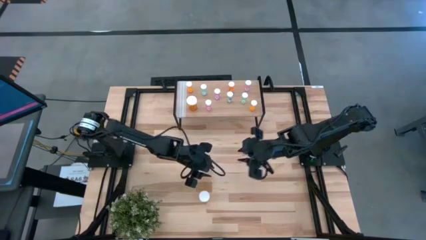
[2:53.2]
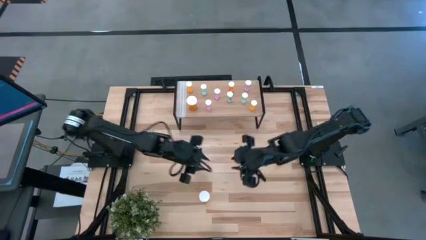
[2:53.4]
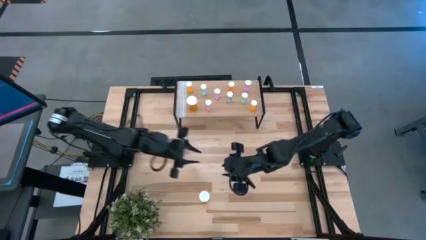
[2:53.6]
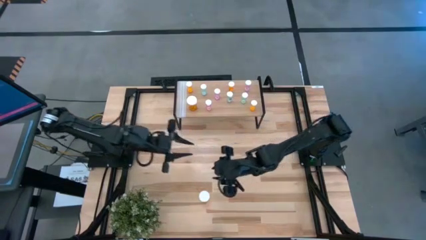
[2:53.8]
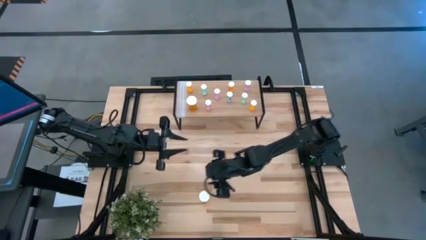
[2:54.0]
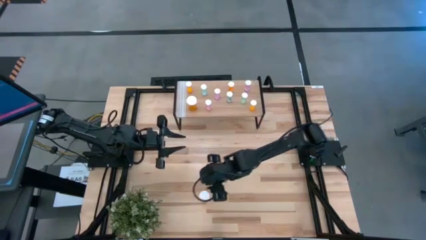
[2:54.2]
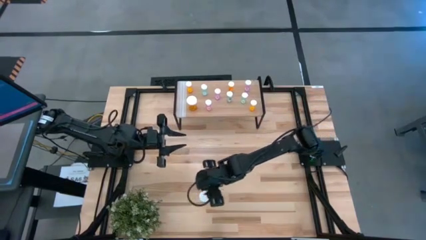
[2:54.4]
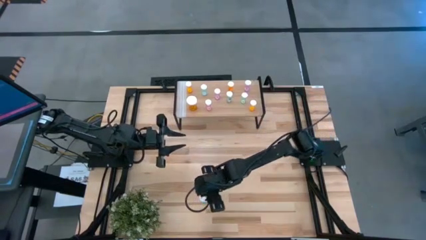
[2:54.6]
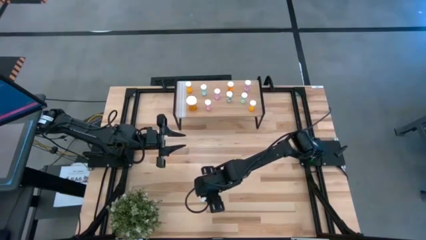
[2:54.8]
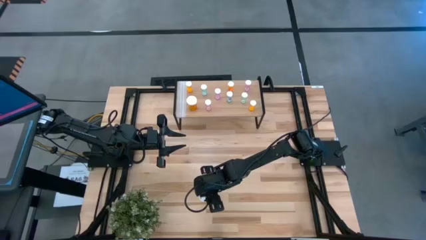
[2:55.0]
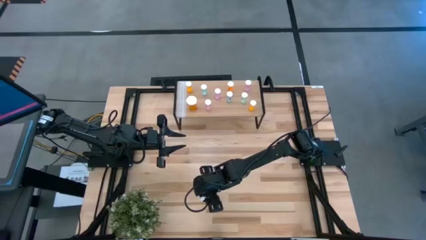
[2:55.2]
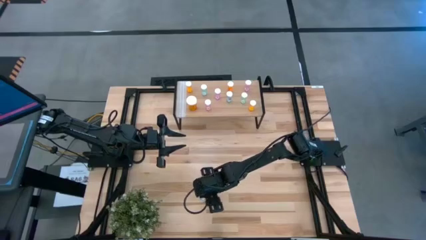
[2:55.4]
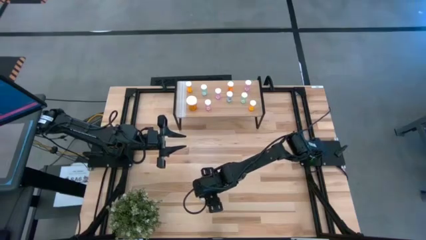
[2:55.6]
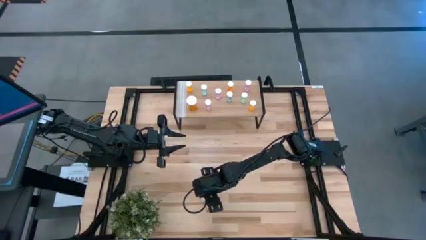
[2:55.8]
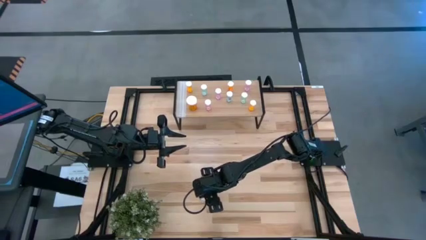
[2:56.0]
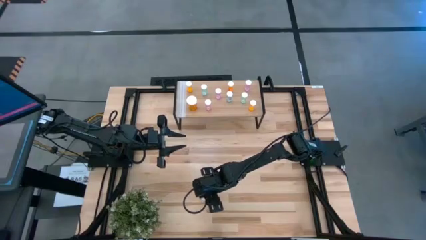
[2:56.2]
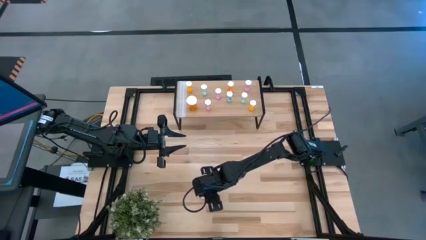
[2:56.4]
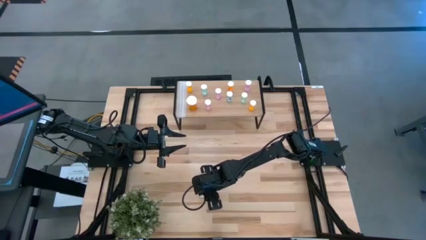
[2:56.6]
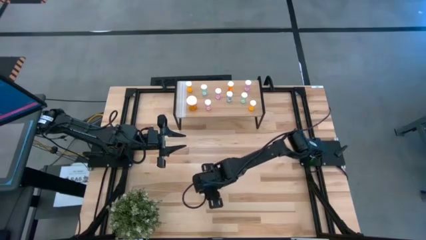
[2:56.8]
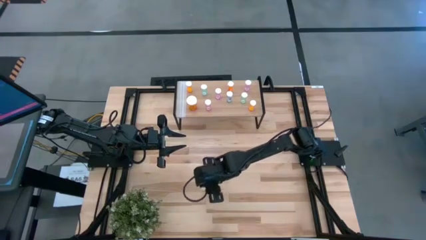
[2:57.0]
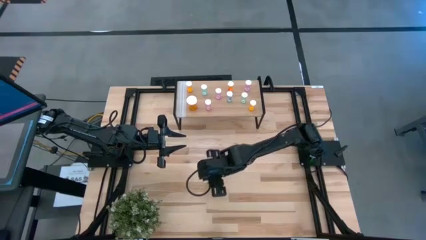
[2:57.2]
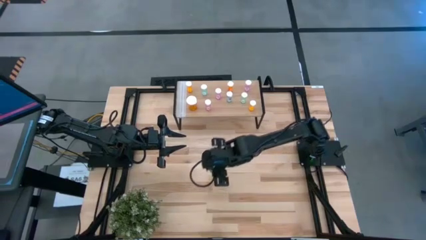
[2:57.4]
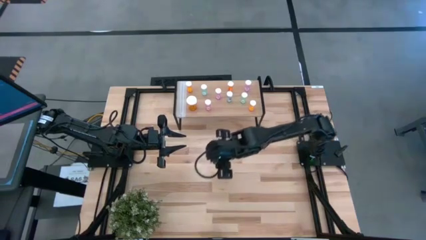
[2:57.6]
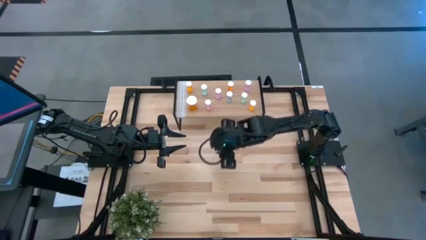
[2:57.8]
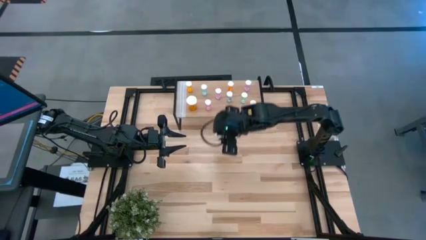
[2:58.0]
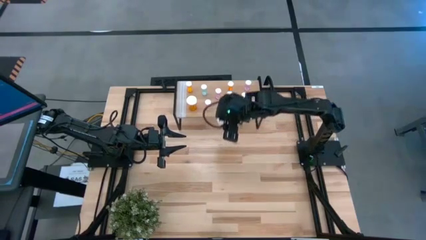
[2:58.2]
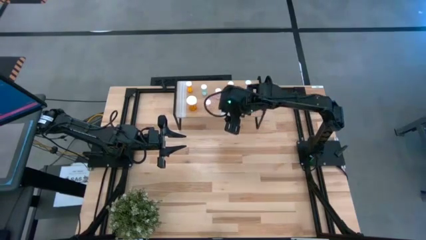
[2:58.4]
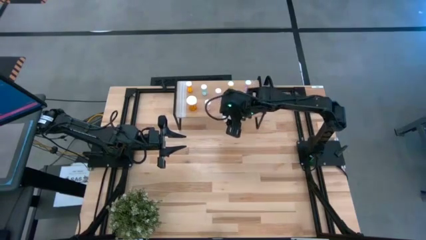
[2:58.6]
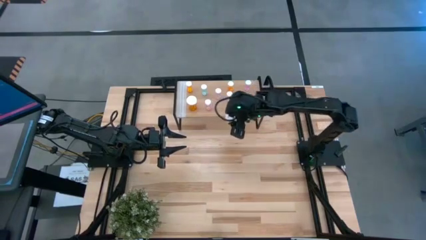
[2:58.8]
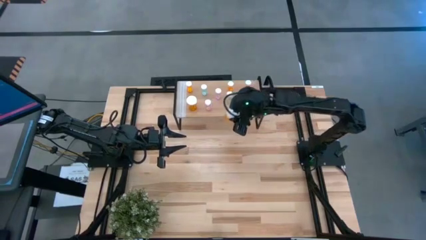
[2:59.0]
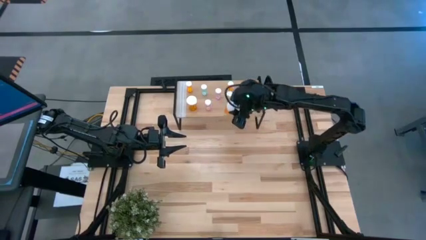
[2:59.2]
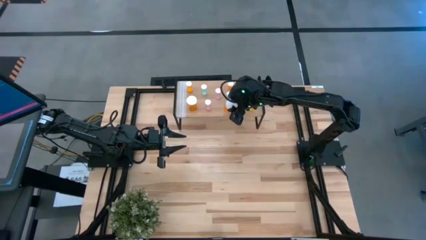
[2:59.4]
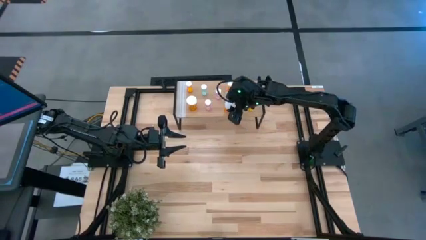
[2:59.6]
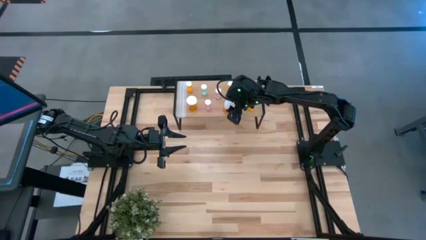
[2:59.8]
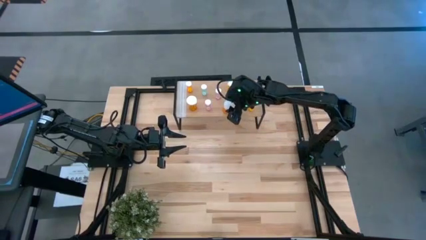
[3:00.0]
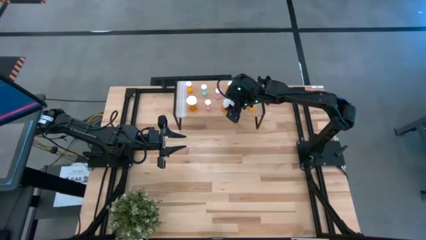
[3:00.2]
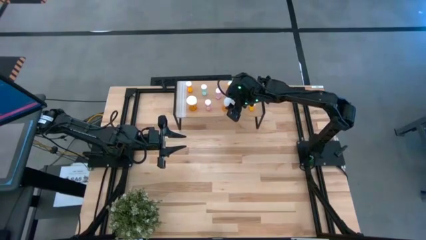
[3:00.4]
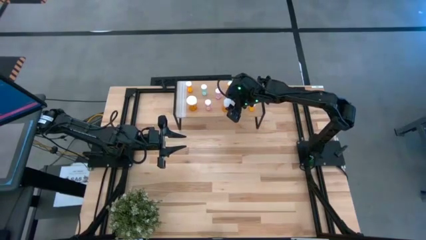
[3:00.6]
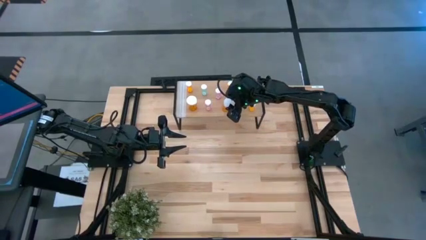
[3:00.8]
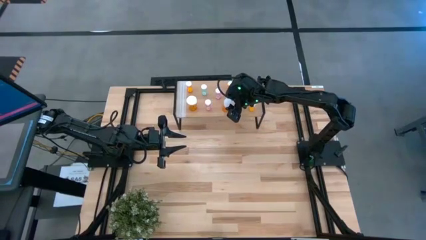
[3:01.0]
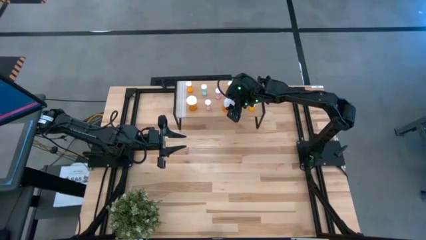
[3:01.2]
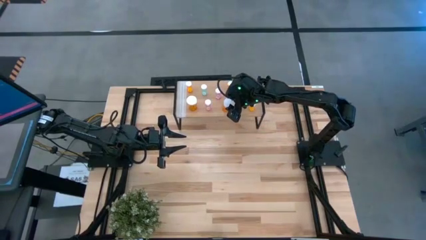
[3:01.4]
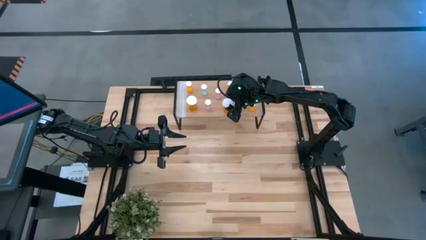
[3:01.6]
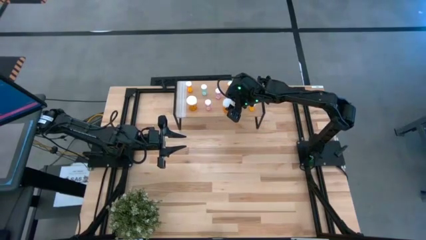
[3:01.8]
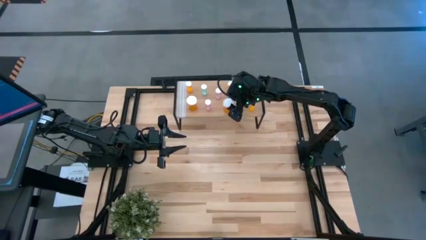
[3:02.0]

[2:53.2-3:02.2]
Task: Pick and place medicine bottles onto shelf by color
Put the big orange pill bottle on the shelf

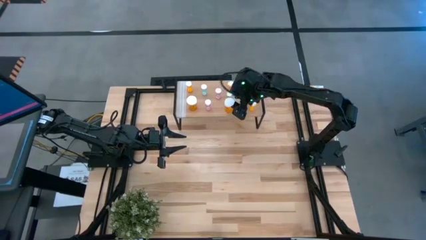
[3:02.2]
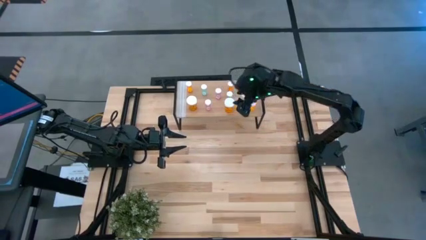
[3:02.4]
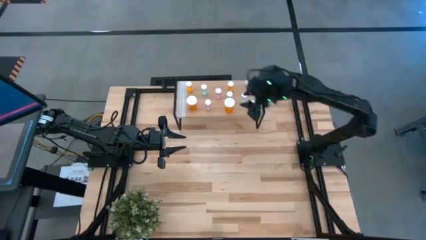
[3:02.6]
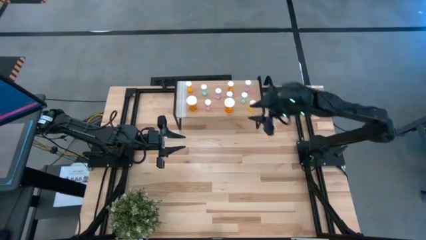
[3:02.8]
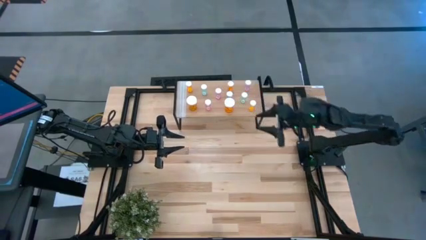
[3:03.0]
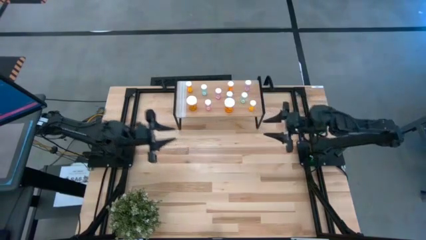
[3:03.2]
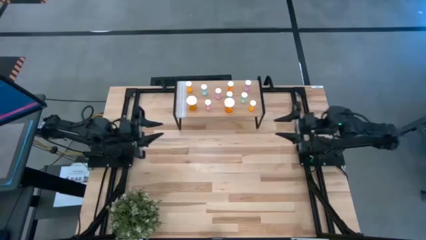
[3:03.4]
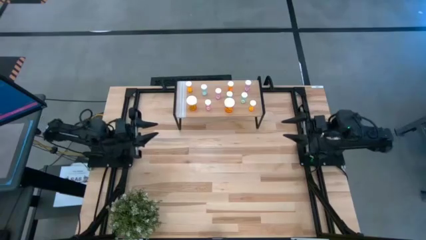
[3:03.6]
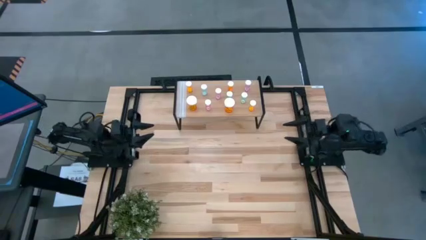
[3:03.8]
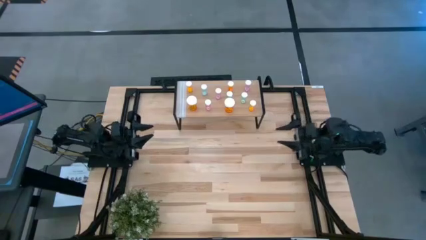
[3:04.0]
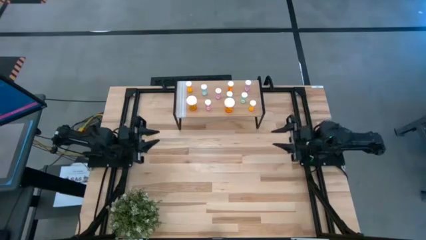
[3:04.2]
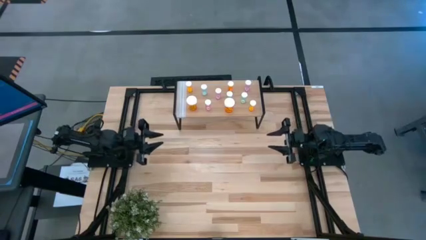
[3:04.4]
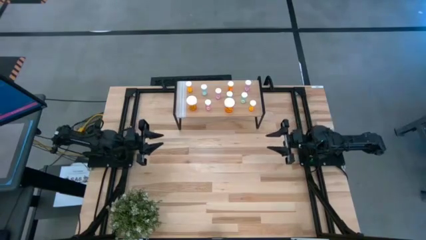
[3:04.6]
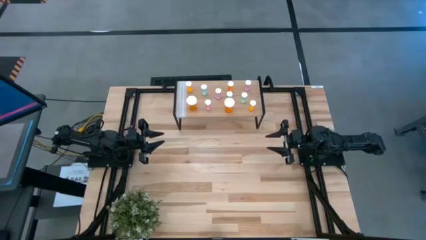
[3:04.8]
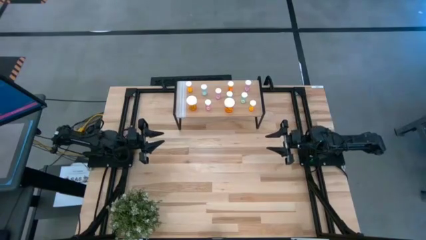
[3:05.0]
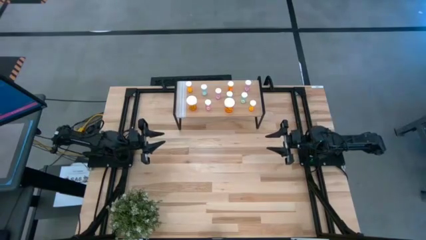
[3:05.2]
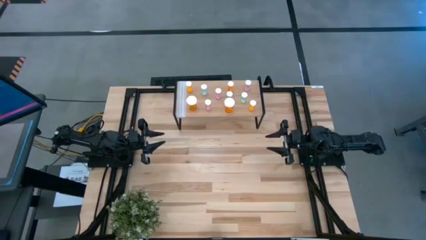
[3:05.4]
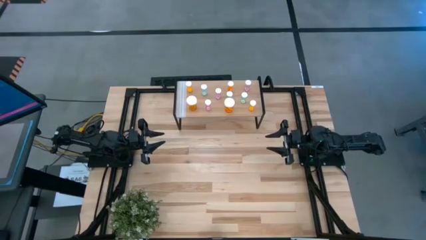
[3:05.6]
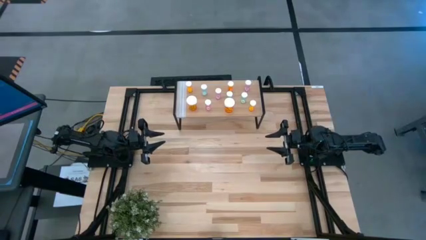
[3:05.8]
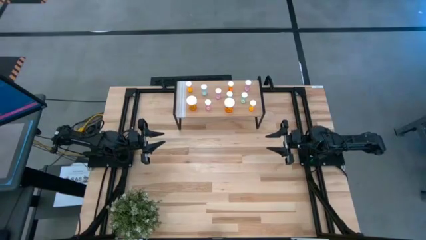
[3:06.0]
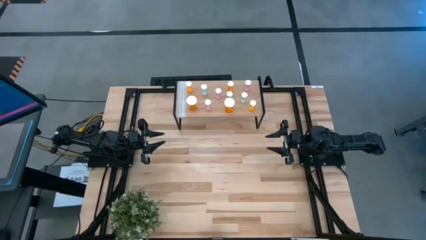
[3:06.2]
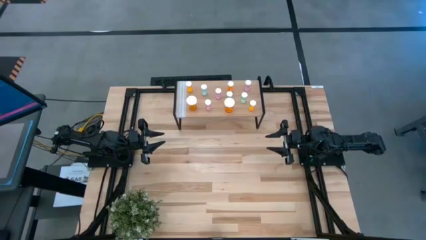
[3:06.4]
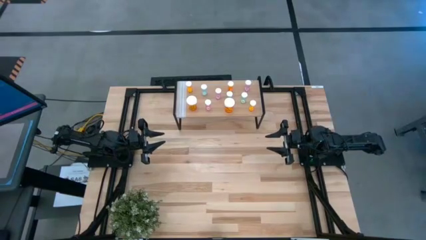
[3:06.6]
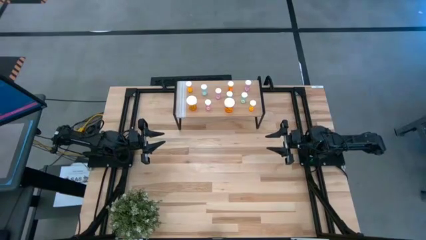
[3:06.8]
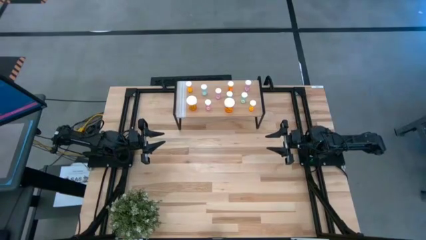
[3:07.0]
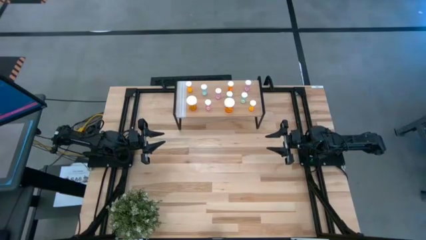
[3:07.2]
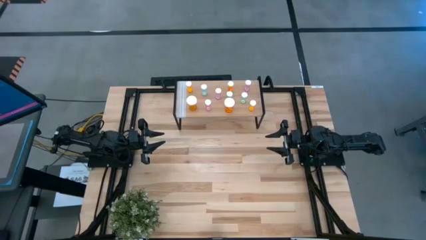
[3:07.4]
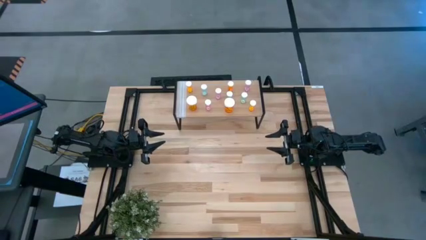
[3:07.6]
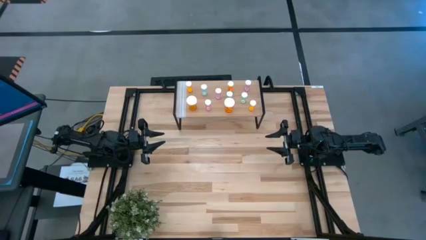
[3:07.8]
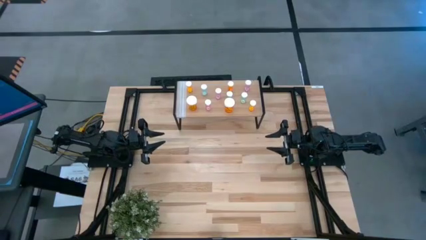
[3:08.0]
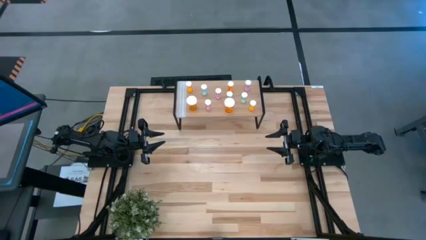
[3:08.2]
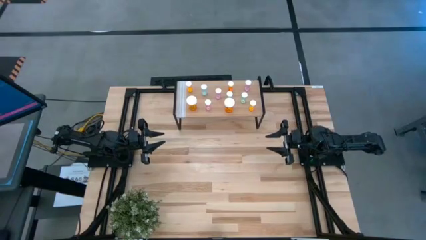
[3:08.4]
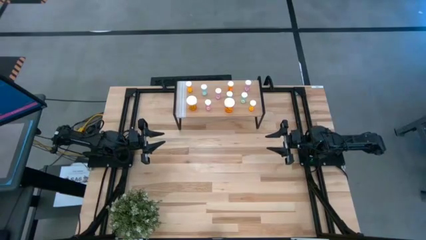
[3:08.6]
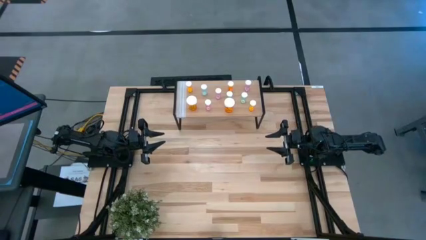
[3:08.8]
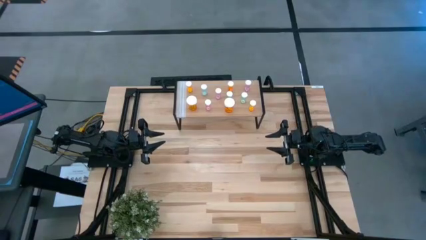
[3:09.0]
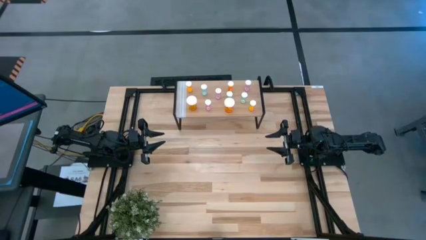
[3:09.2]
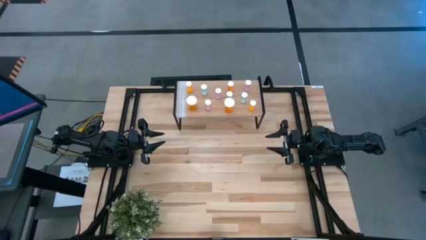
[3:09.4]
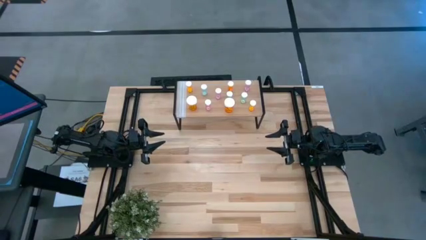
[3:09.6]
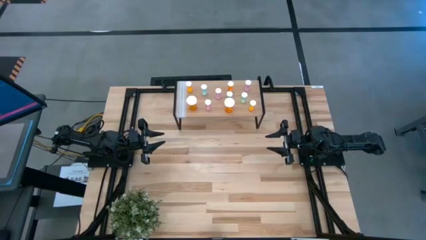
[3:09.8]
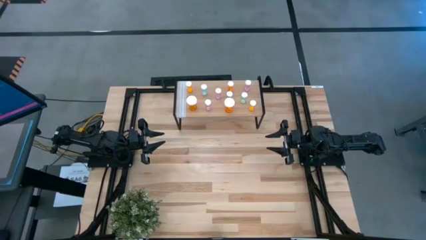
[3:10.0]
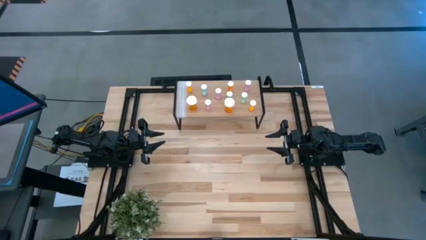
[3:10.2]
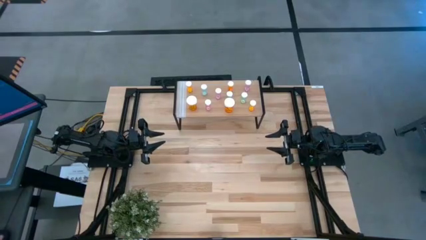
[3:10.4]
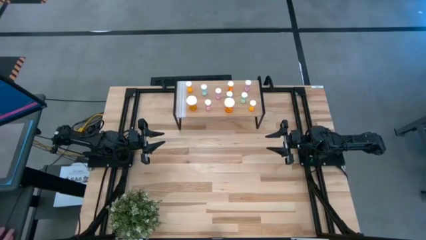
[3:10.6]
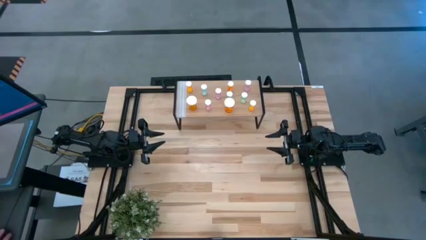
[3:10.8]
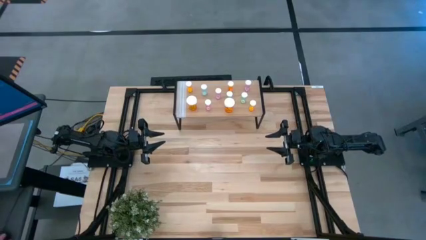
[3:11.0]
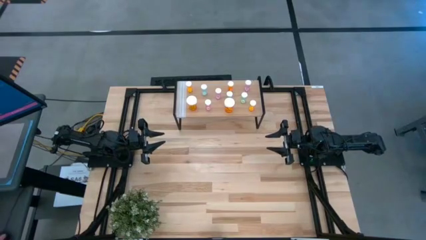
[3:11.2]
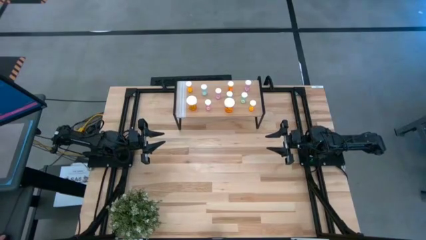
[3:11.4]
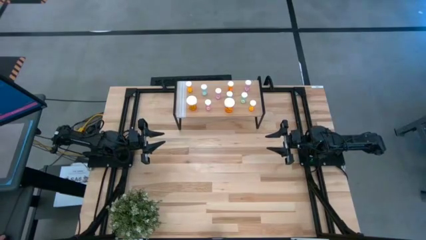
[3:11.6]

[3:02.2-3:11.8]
Return to Home Position
